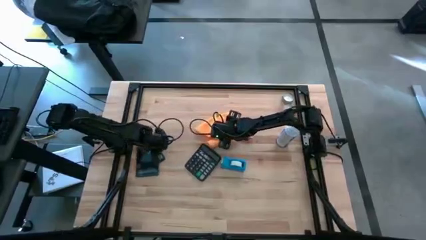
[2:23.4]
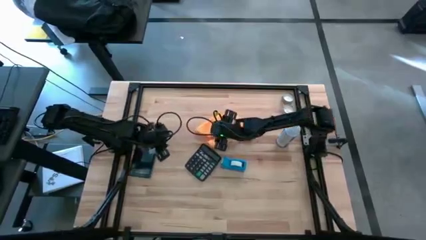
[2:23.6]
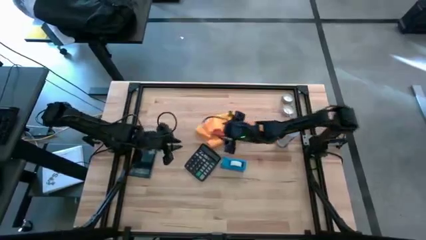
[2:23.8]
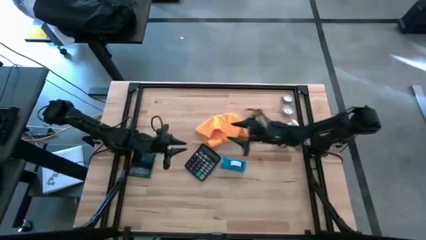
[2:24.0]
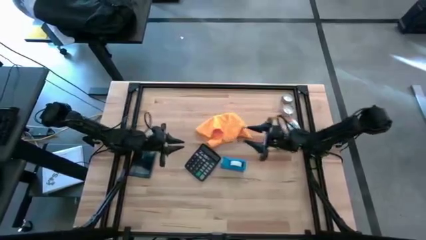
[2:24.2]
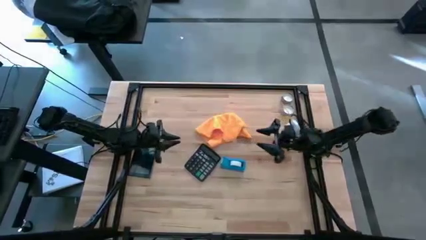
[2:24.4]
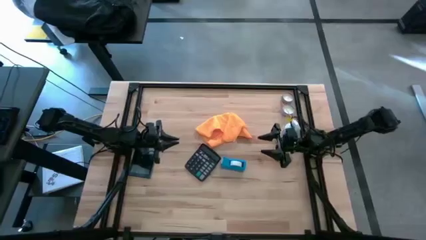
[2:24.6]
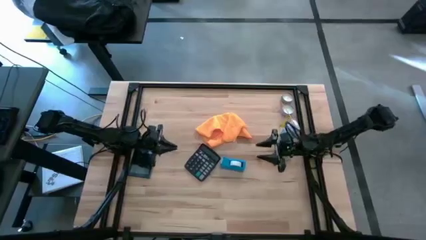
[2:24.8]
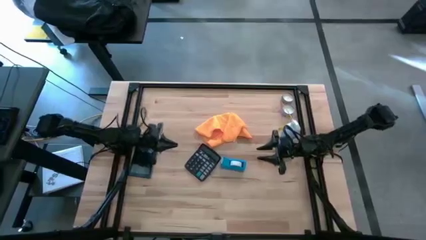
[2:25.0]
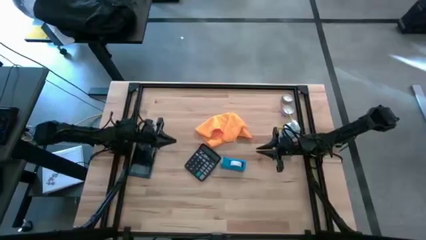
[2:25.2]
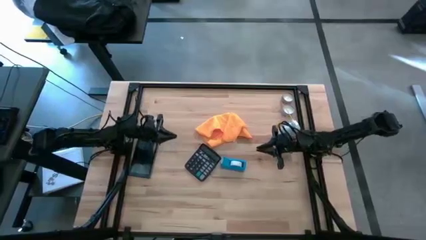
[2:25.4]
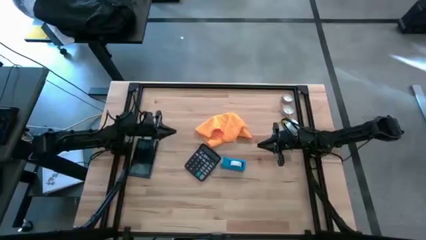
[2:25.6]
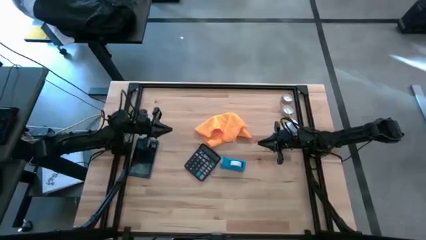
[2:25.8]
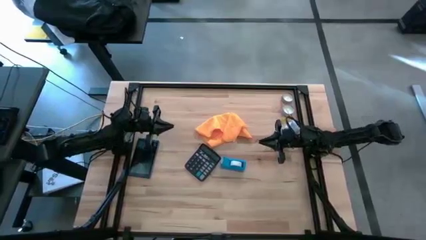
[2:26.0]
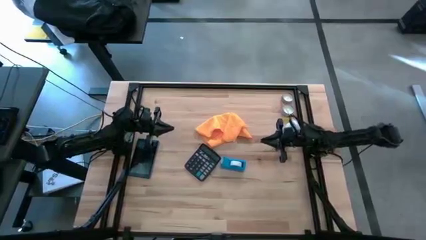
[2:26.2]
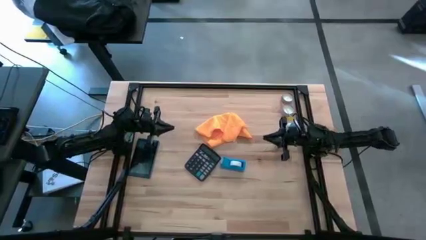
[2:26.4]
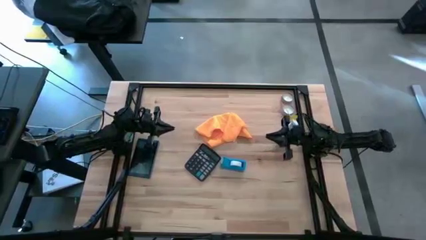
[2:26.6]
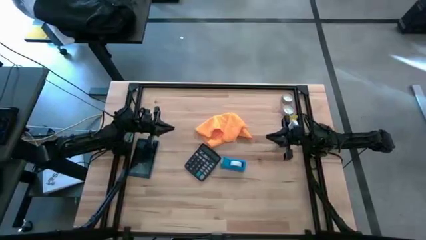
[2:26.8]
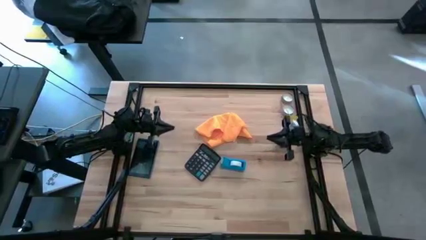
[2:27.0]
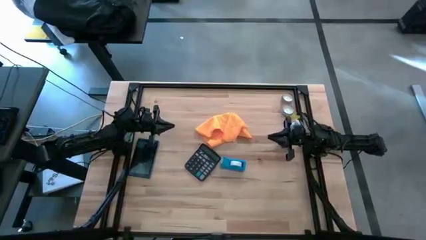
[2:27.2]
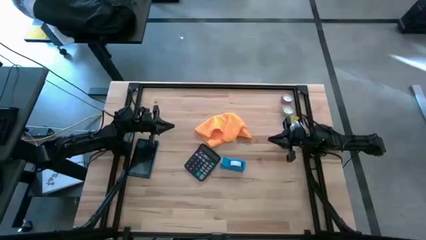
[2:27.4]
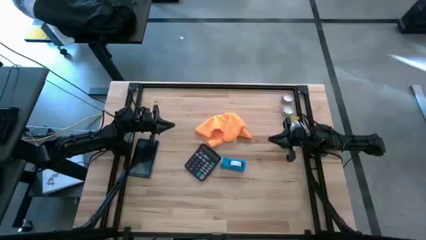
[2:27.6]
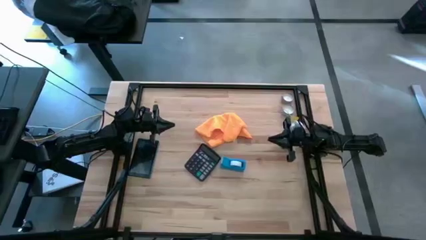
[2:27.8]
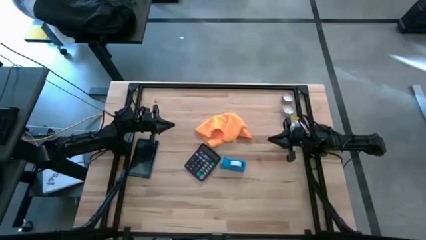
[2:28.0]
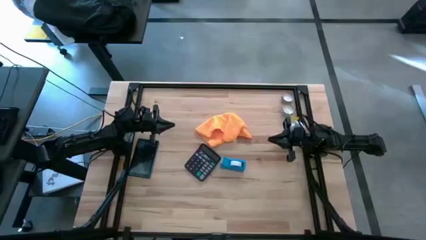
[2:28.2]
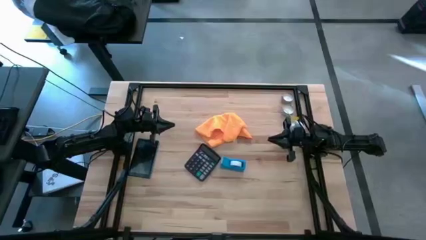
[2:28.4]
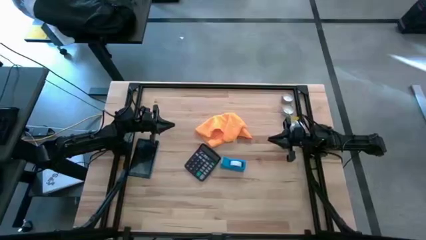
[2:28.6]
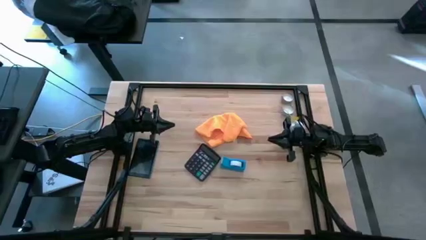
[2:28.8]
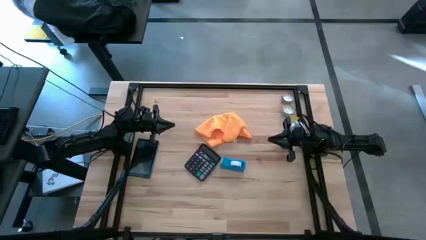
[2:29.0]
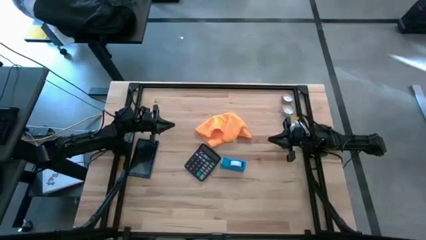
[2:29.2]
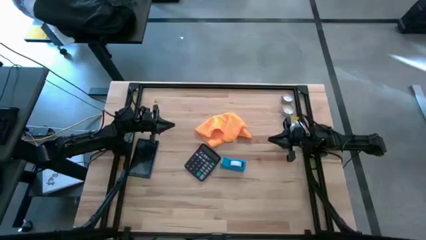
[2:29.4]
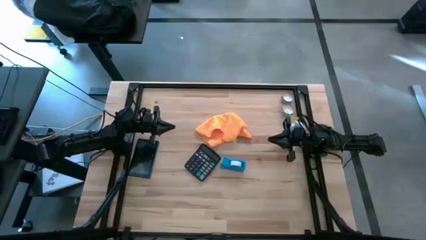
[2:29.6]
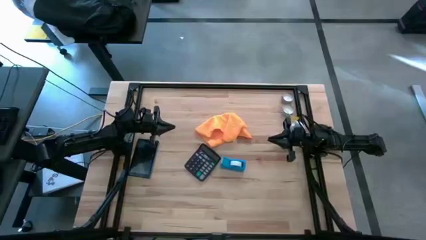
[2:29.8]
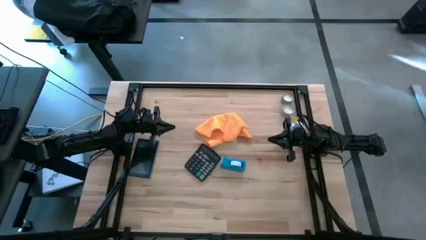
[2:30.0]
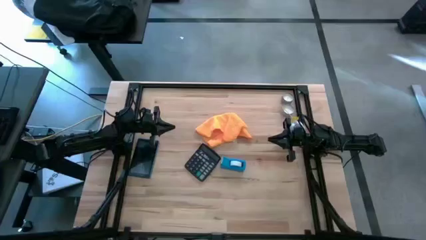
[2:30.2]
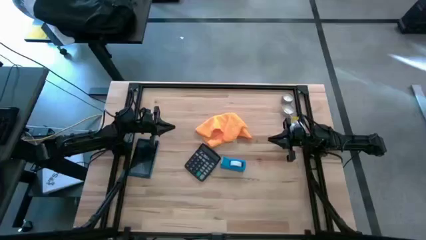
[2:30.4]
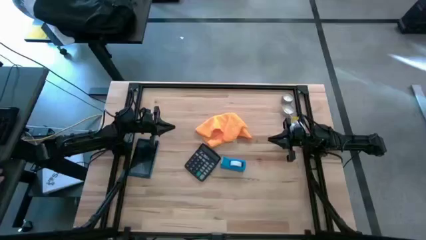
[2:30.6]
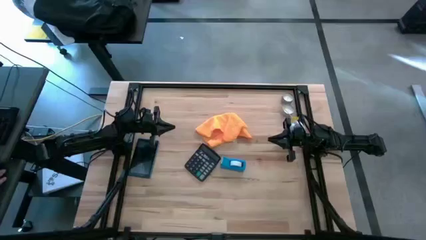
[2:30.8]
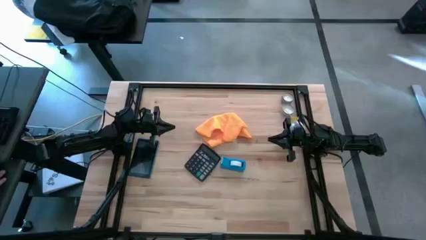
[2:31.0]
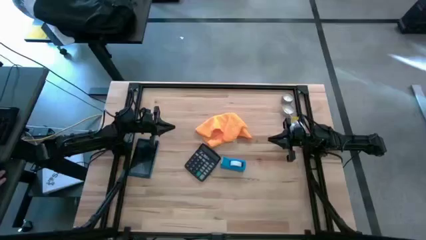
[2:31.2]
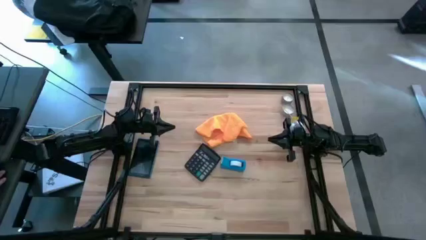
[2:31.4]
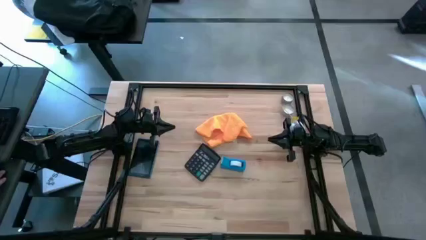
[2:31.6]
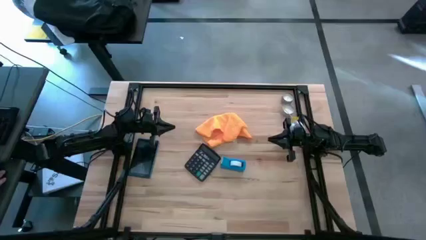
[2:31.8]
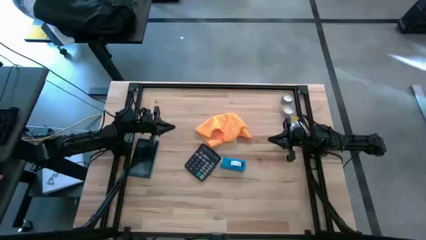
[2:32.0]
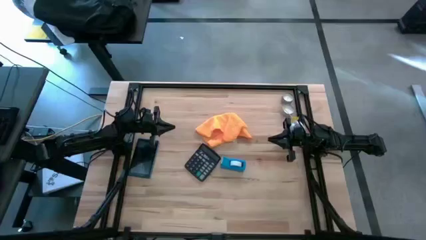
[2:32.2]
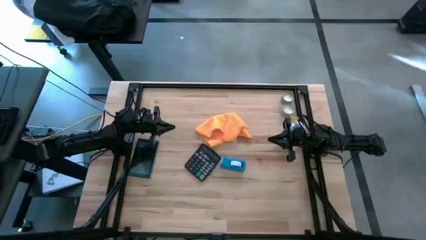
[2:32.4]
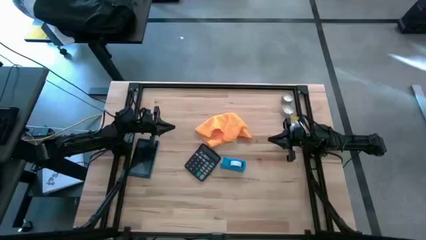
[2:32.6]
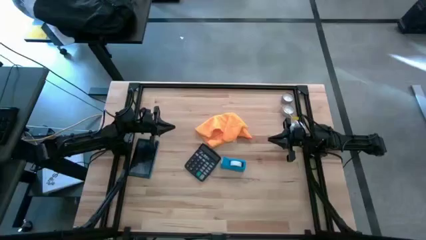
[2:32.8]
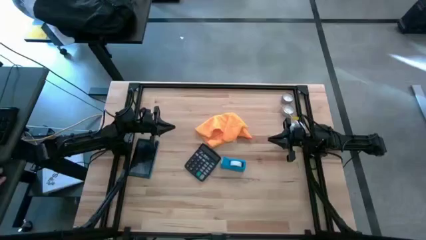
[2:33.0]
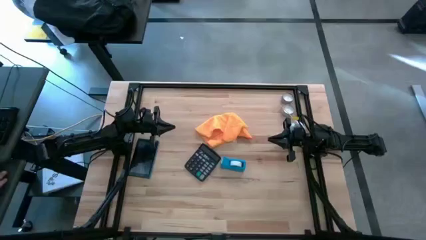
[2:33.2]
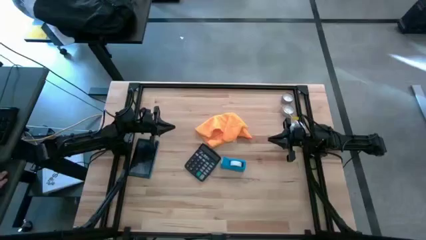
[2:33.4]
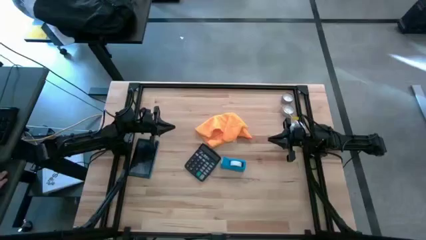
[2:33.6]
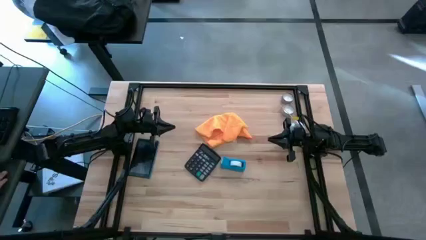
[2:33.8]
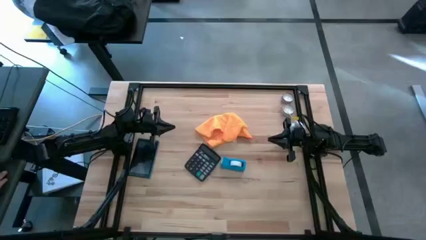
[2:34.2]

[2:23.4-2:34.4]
Task: Apply microfiber cloth
Return to Home Position
